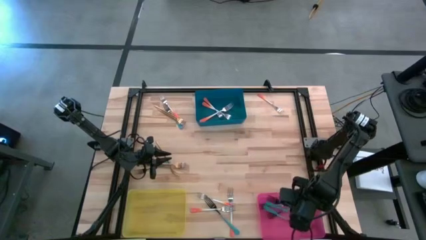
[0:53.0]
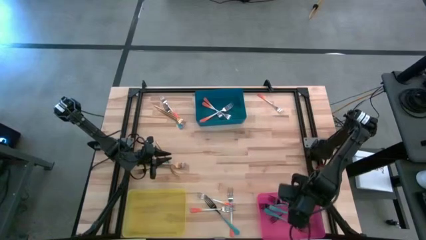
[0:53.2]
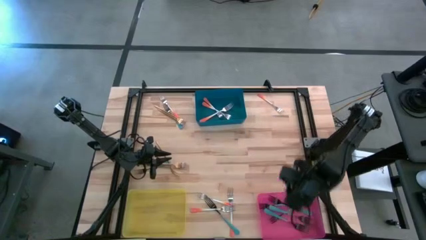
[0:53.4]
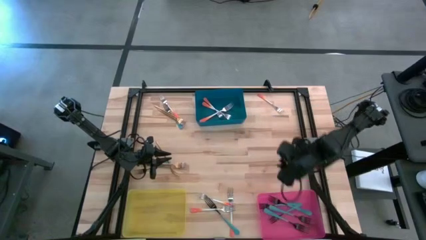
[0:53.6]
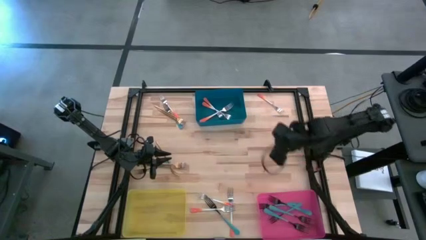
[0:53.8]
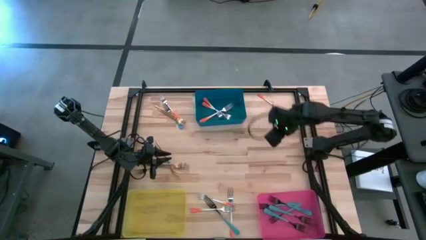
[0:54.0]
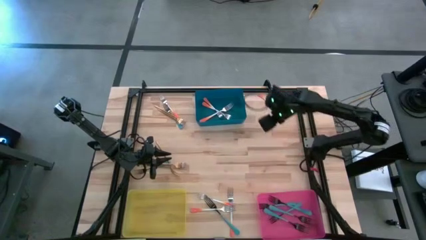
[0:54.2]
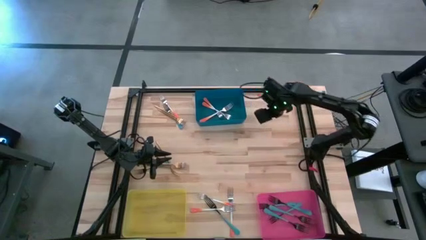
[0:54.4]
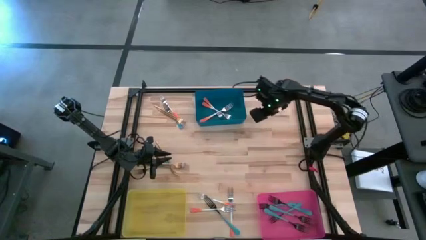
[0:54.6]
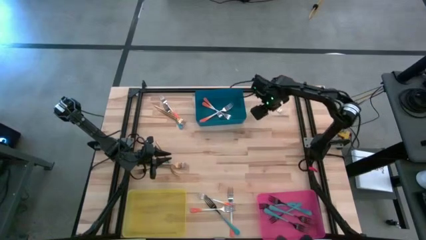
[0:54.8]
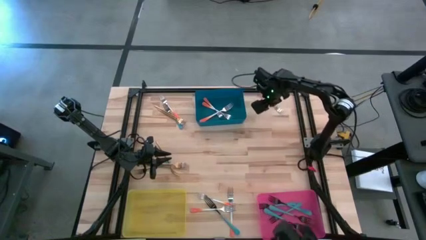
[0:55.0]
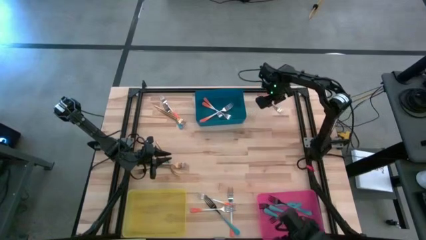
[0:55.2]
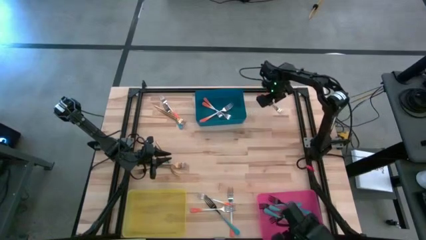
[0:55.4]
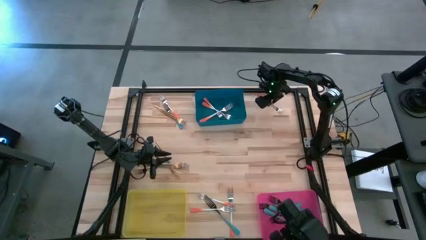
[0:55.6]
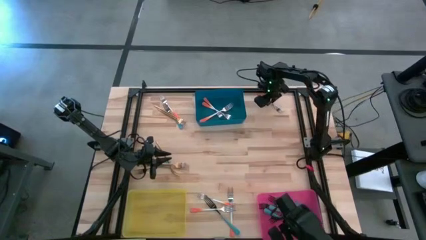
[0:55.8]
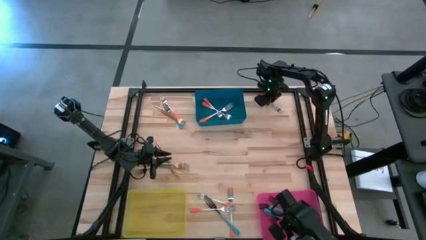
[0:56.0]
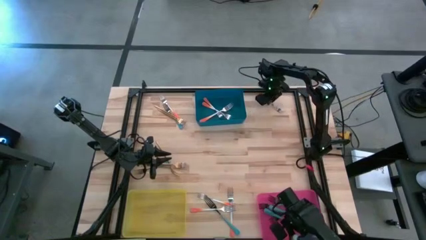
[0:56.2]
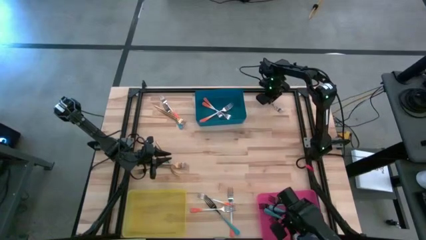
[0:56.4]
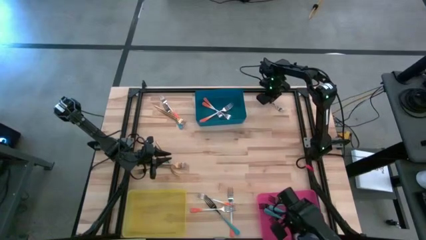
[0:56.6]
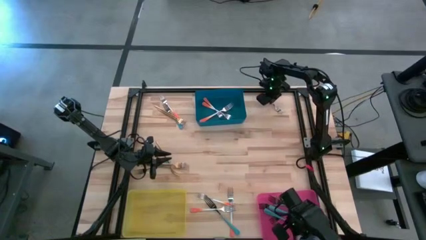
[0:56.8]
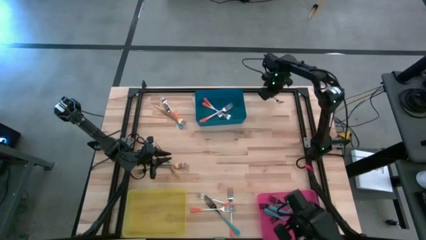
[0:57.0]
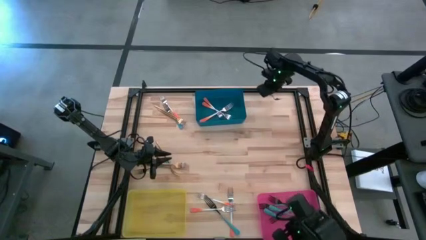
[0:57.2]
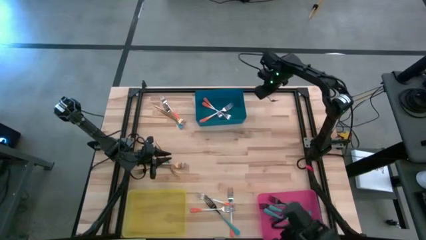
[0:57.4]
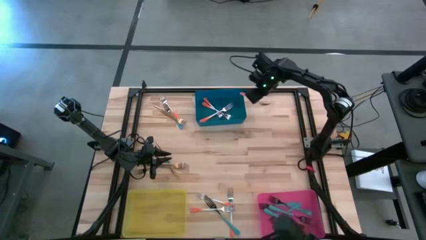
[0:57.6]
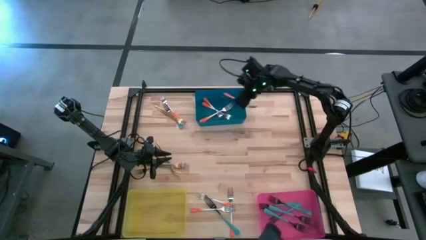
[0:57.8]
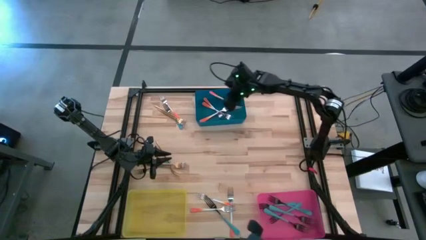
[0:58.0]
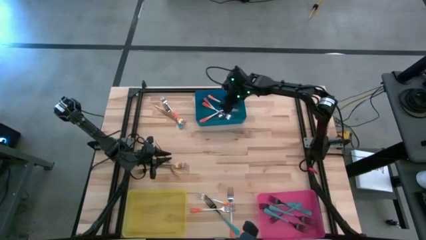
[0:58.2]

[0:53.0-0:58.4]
Task: Sort silverware by color (type)
Put the orange fork into the blue bin

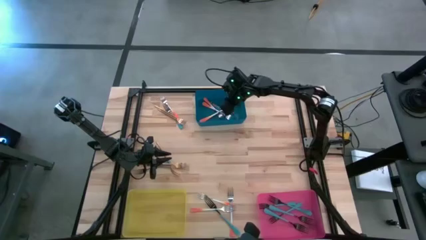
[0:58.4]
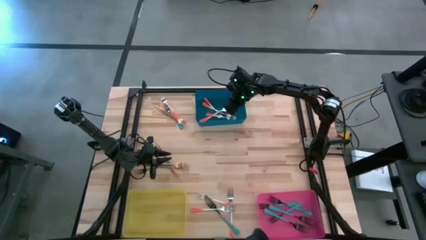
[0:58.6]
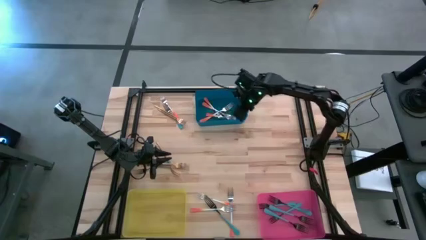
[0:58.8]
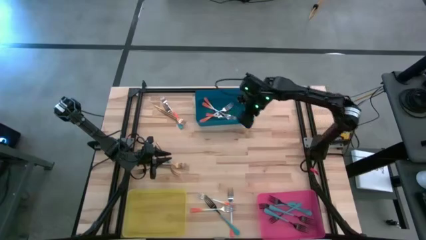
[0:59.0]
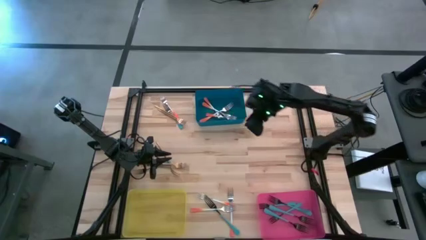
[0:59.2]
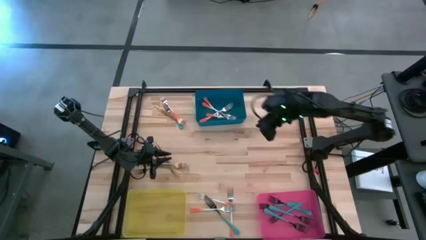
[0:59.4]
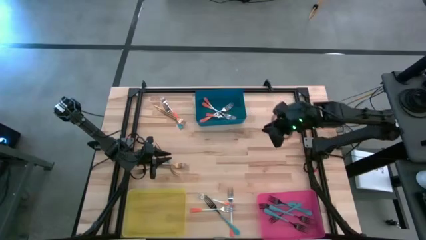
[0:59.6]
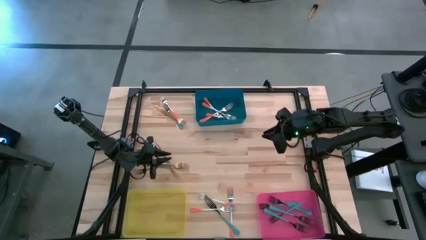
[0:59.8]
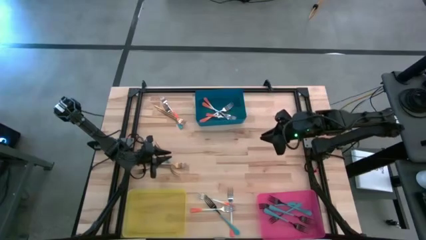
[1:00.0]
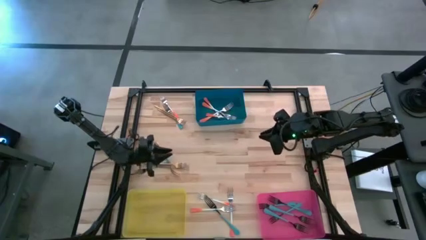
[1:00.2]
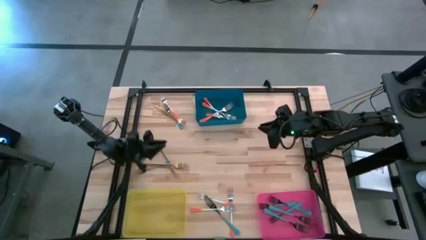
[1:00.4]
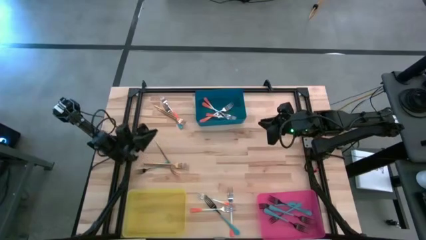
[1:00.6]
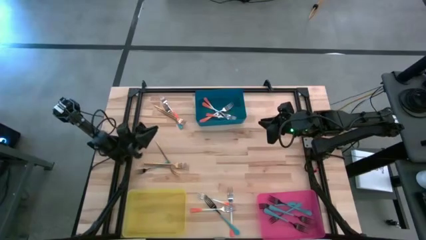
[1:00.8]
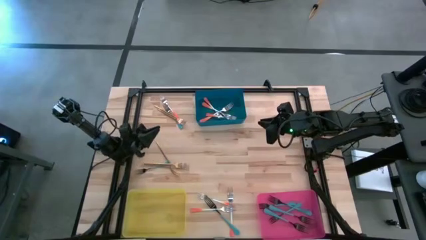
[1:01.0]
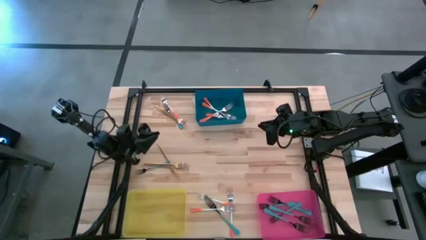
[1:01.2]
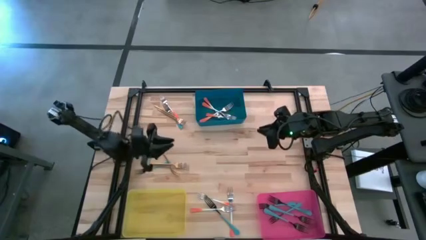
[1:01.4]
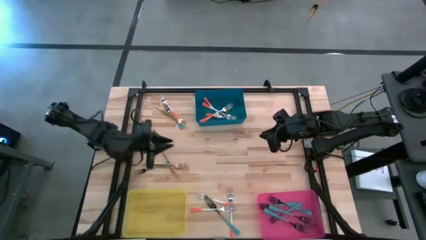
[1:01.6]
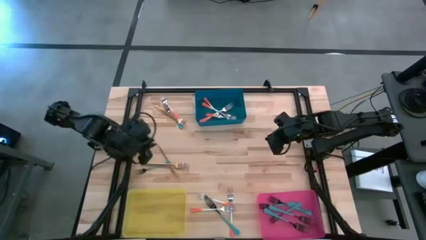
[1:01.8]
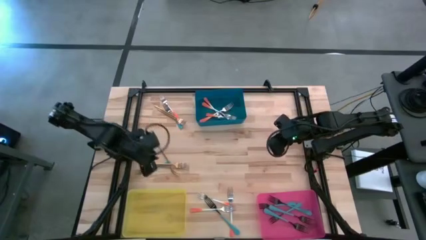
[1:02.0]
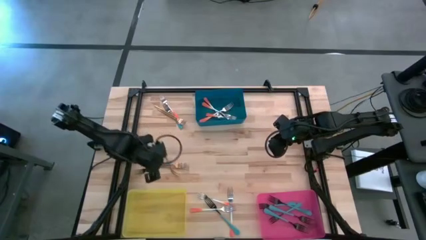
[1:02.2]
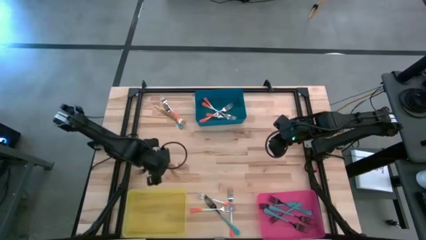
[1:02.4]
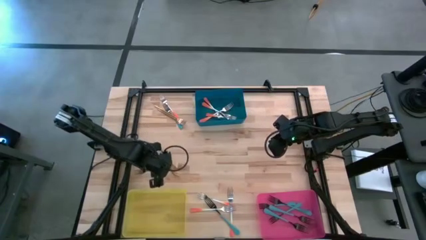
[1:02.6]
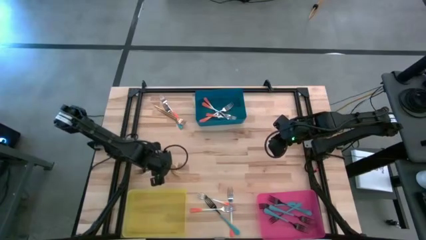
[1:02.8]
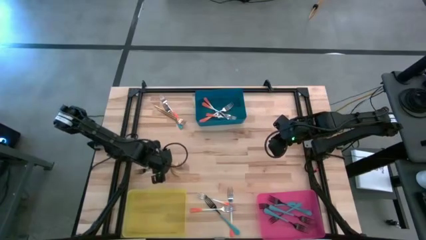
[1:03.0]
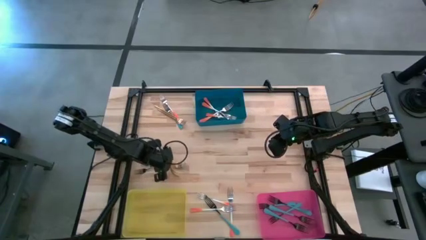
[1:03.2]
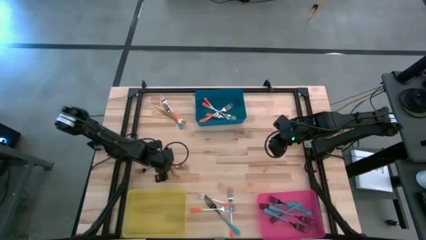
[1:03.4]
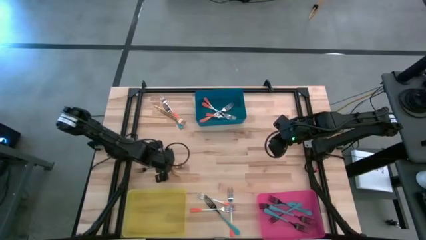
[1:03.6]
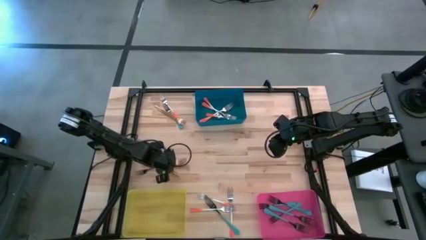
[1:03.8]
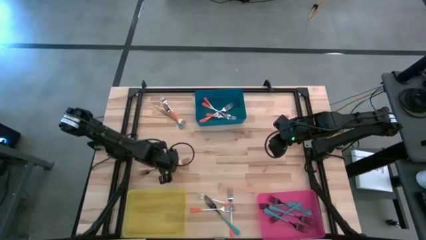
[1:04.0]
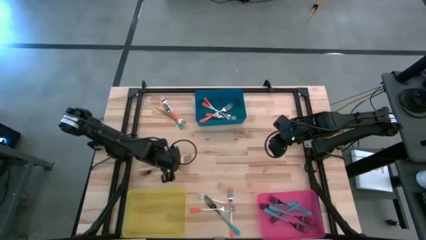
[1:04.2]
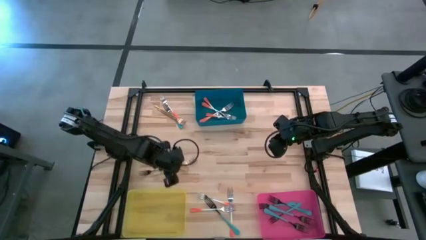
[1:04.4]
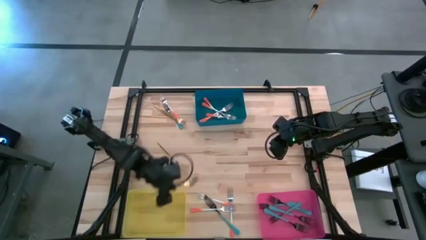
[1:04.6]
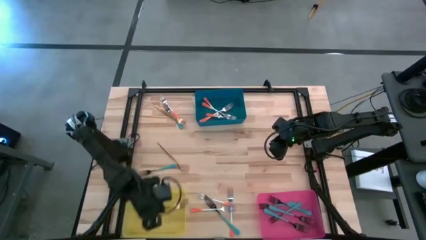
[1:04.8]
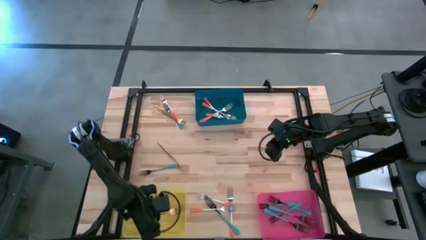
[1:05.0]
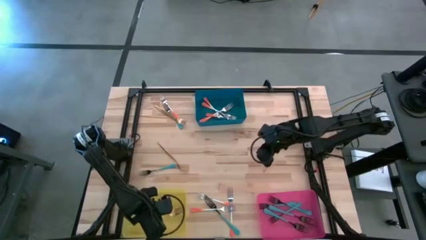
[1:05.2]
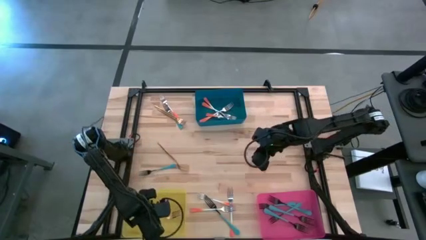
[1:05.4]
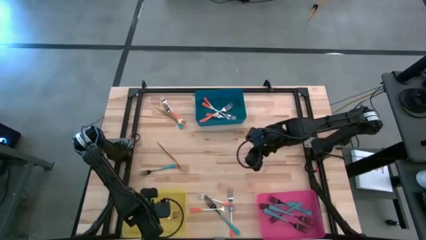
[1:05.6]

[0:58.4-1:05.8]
Put the gold fork into the yellow bin

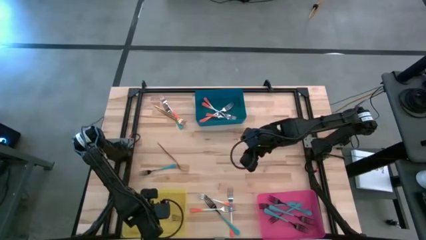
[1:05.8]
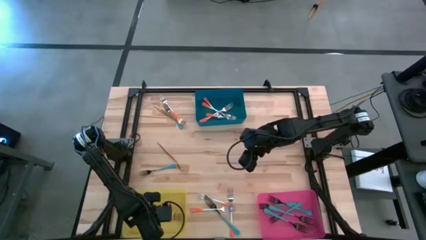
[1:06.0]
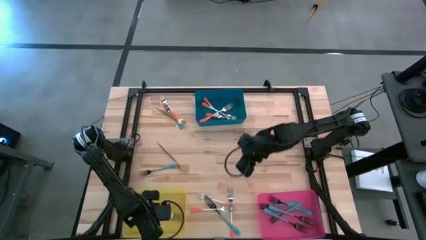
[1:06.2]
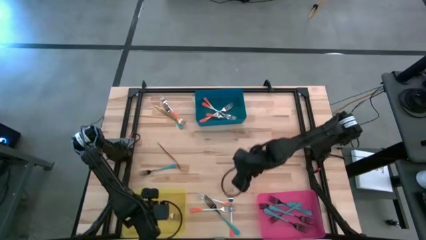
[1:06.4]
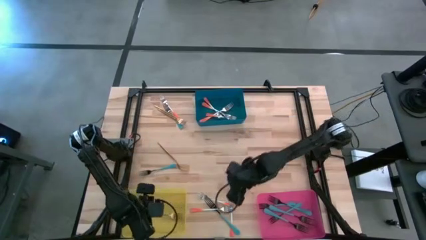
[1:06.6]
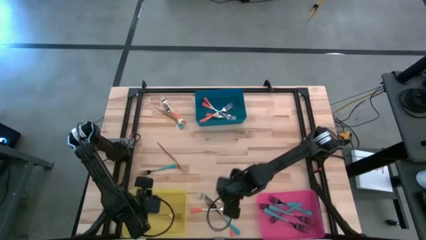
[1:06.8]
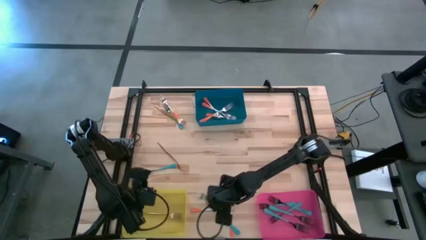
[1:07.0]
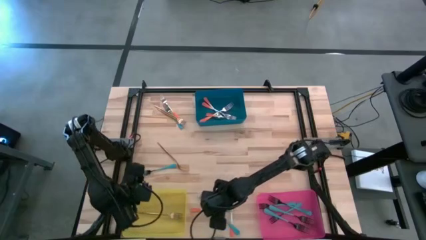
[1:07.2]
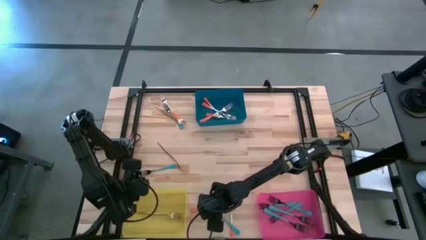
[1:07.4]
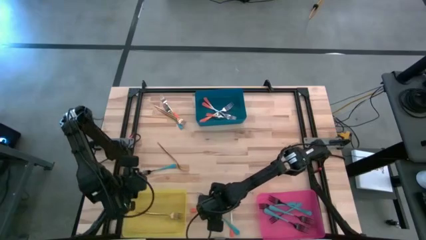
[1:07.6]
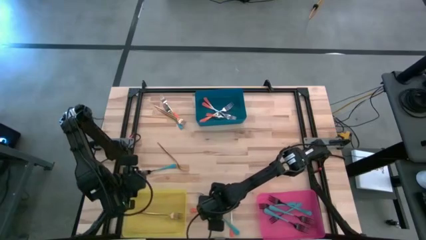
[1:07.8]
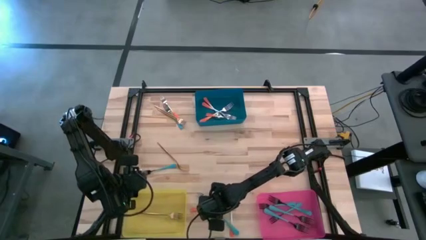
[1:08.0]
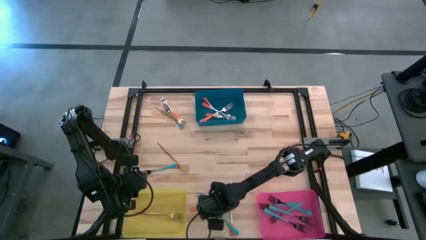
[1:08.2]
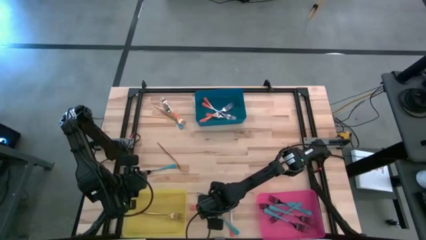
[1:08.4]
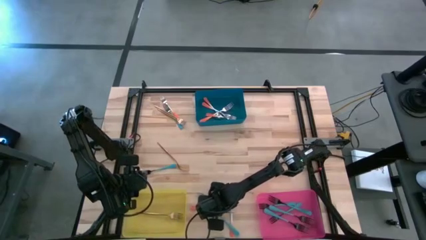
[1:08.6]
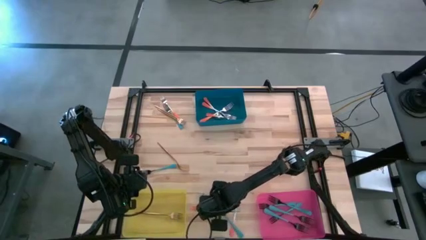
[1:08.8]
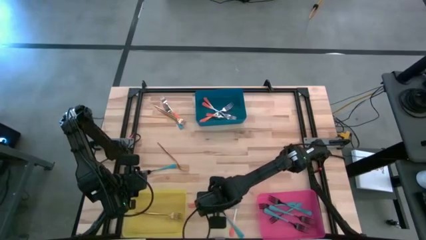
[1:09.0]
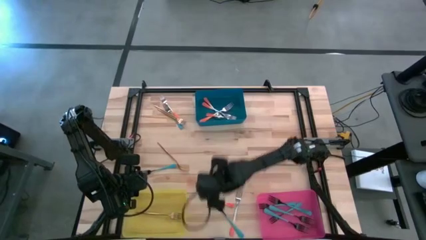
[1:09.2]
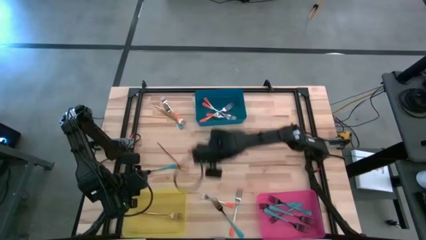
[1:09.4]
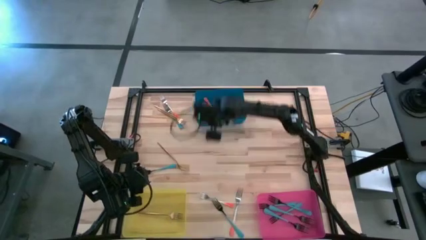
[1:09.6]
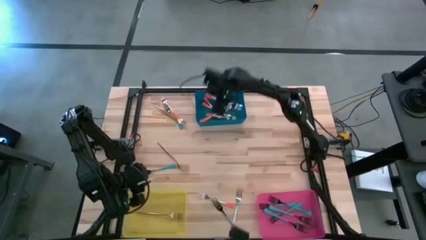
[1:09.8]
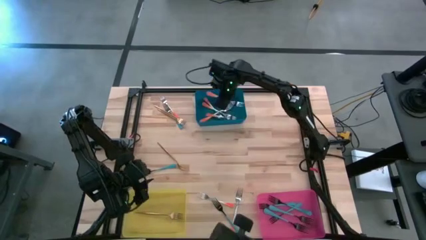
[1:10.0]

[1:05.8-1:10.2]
Put the orange fork into the blue bin
